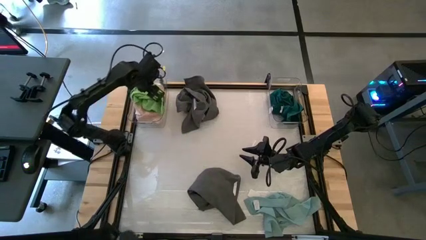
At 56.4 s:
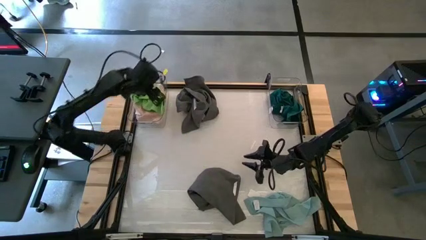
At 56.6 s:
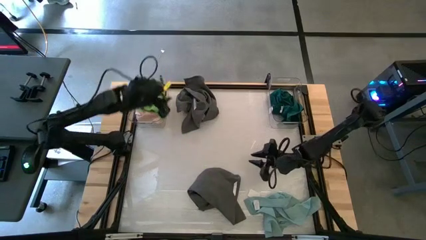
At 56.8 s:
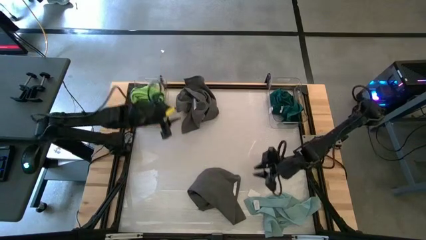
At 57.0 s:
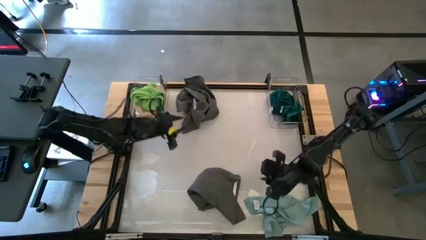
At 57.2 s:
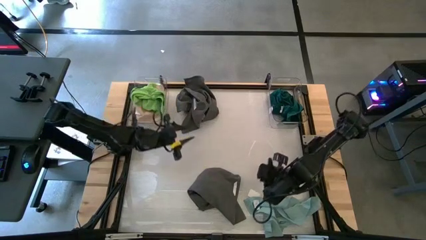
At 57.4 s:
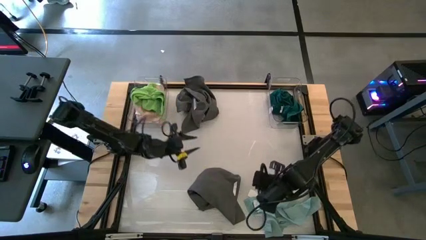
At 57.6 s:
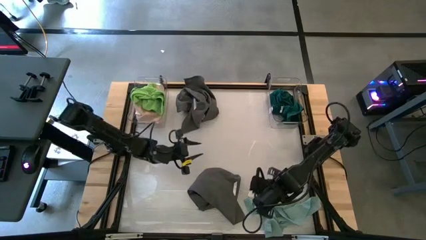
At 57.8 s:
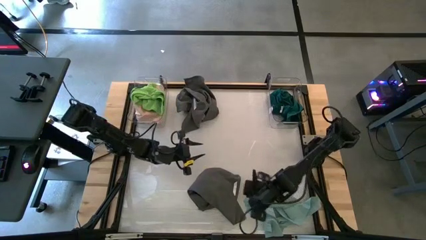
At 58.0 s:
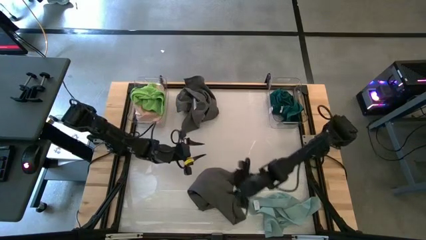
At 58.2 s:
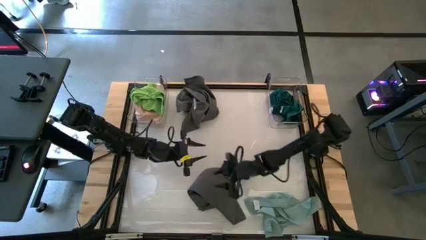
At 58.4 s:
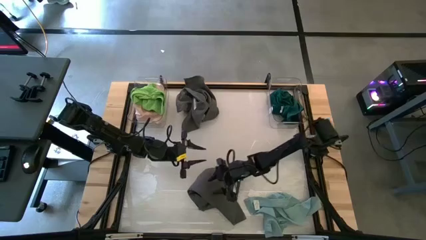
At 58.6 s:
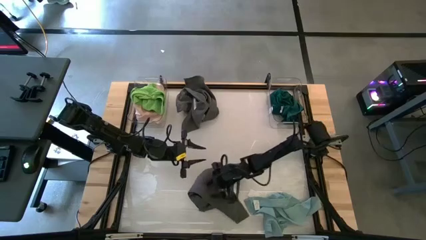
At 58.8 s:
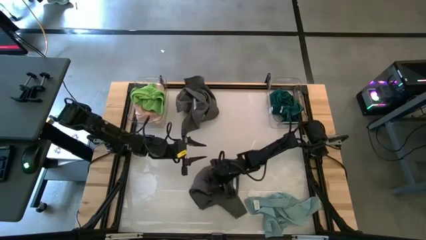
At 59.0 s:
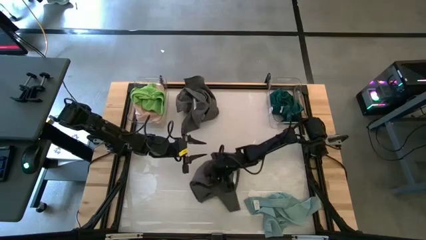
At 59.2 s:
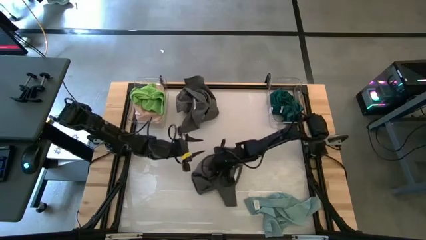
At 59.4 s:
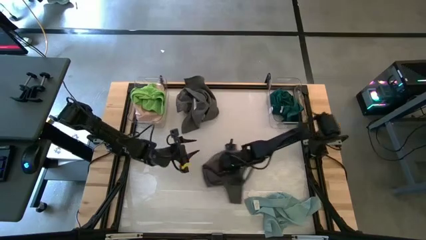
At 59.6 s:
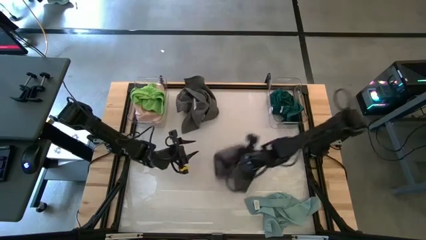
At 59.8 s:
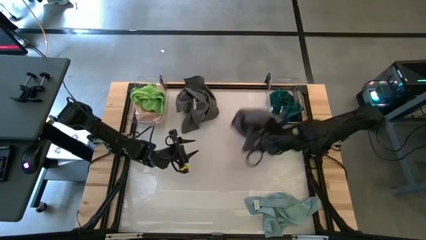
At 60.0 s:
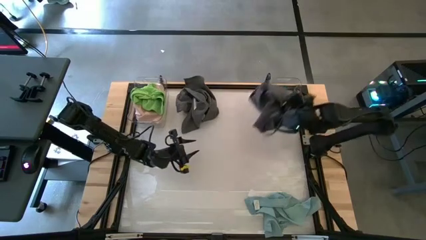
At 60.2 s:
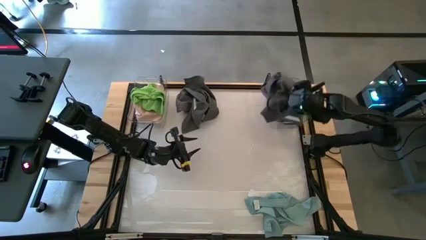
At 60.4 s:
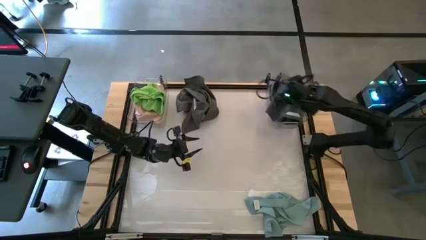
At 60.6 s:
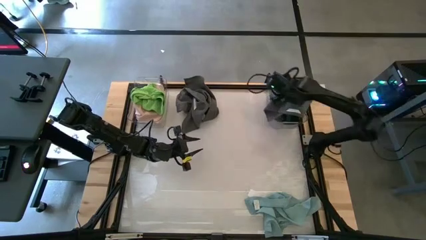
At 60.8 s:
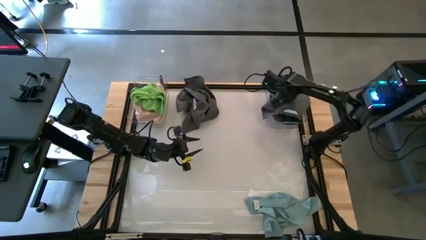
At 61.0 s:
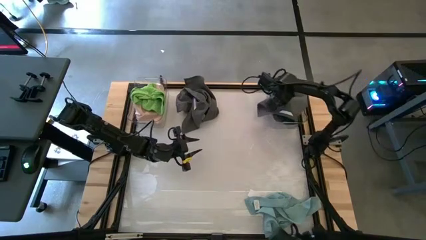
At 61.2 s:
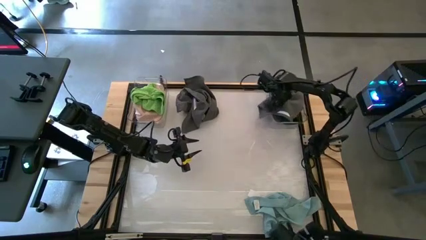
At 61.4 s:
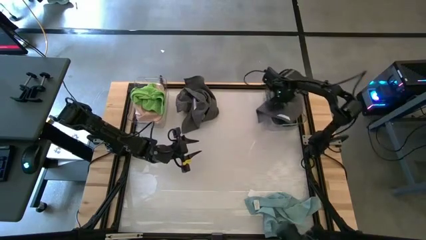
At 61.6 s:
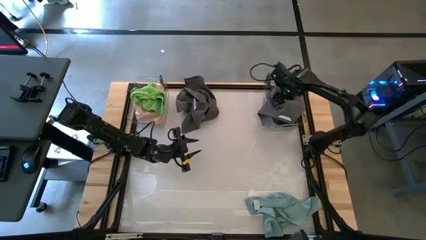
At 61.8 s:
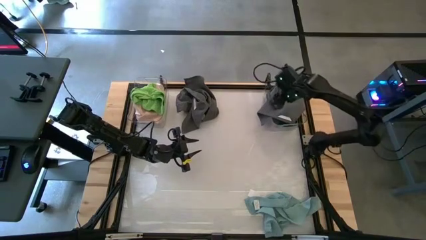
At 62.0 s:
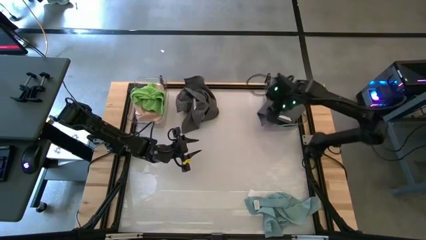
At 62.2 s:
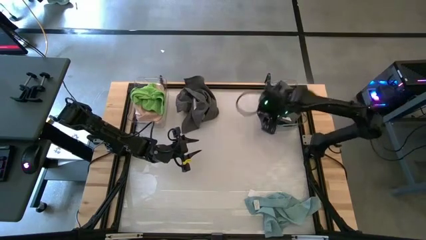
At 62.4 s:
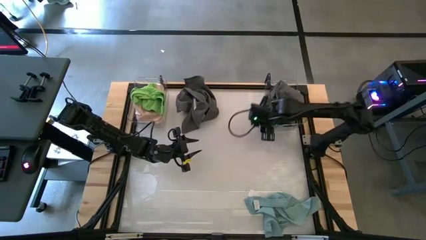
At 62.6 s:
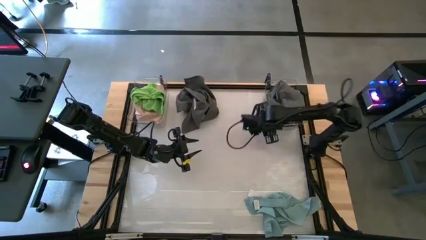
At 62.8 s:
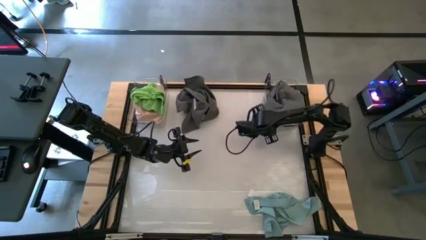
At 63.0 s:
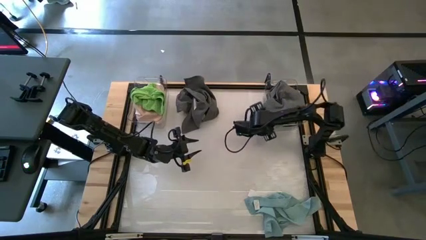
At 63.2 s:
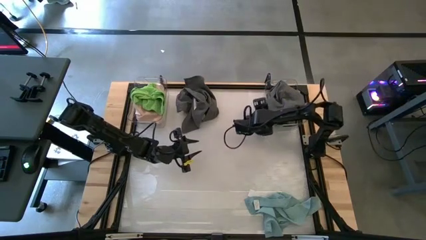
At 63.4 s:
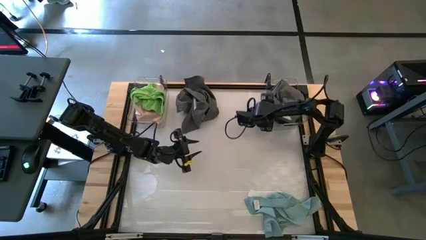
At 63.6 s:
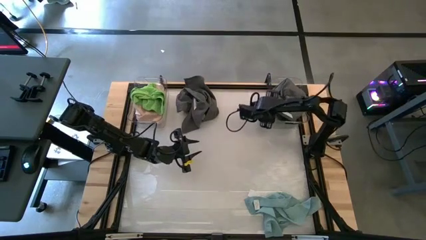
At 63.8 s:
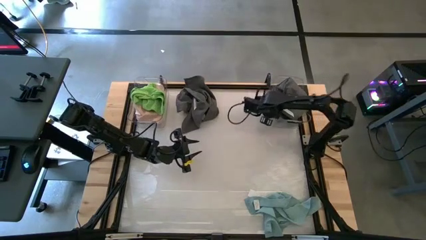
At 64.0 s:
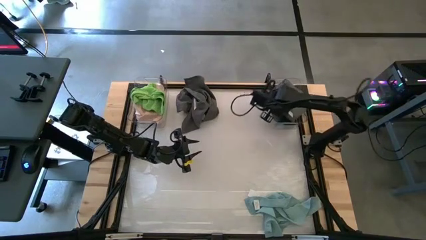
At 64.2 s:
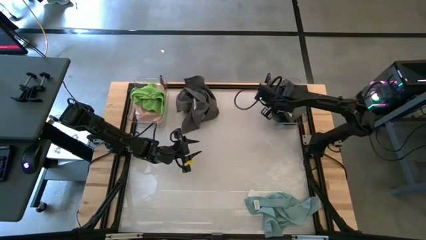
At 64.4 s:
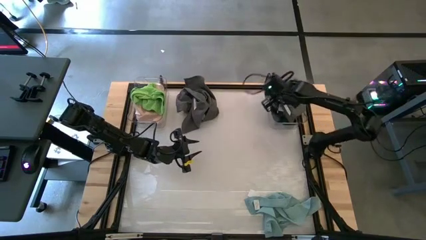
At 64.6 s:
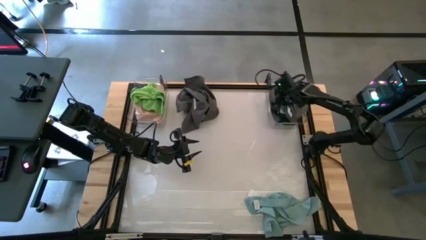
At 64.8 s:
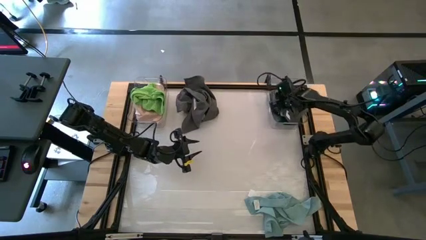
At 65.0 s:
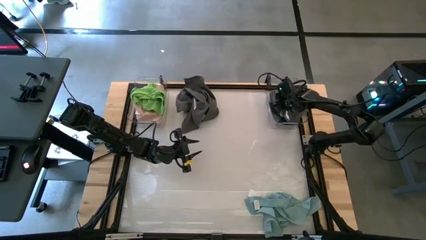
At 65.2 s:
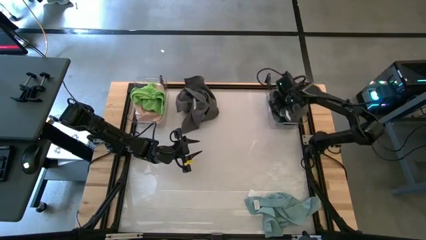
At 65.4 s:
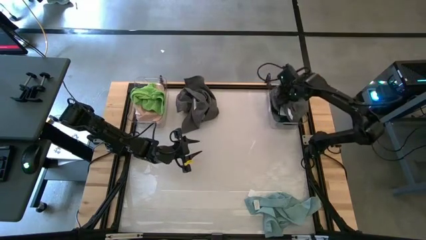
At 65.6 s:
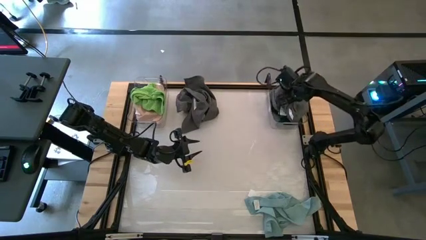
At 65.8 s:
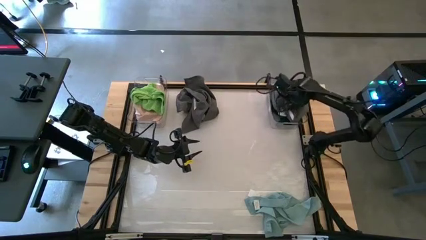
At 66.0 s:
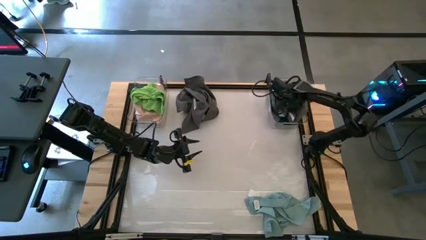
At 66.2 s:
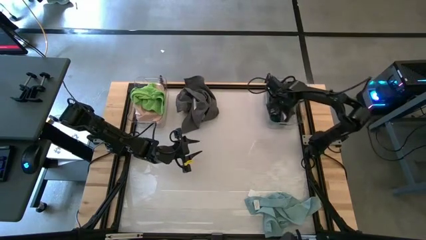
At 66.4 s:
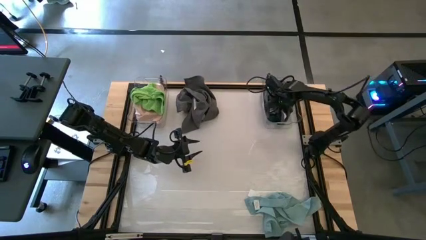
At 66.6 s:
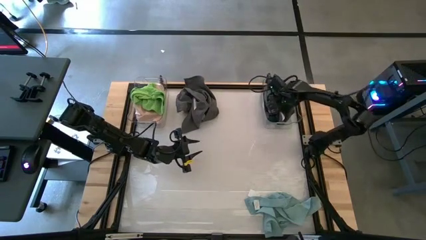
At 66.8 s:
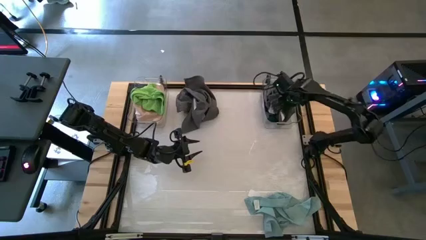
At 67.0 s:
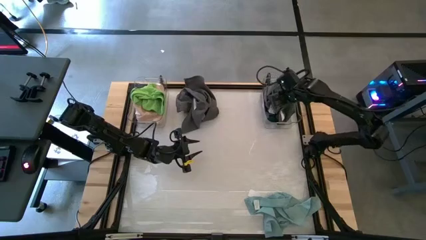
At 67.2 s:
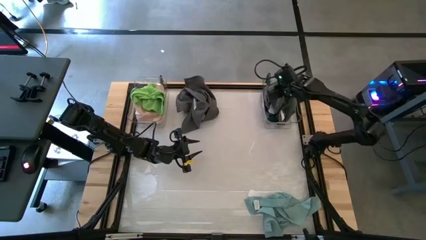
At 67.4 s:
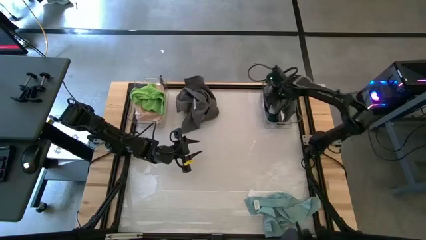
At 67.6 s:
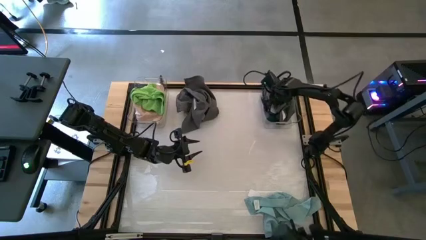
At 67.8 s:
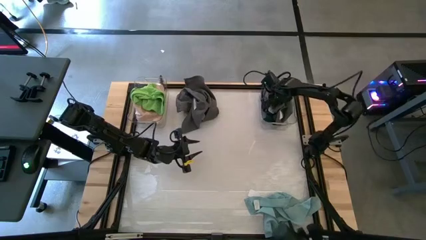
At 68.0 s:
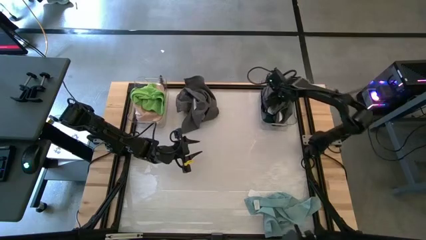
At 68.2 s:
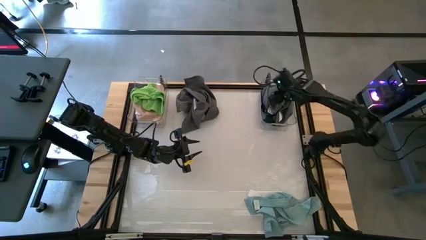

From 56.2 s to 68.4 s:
Task: Sort towels by color in basket
Put the bottom dark gray towel into the right transparent bin

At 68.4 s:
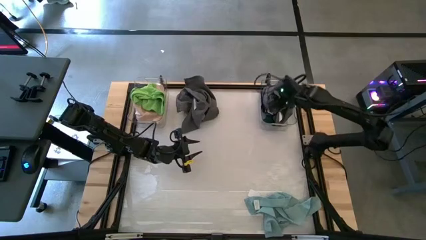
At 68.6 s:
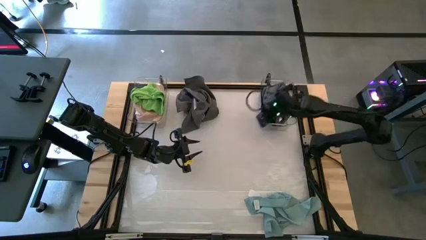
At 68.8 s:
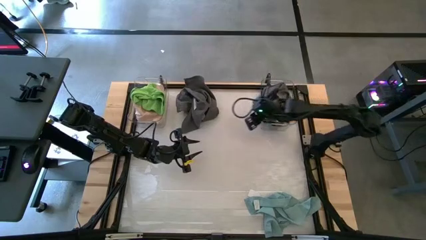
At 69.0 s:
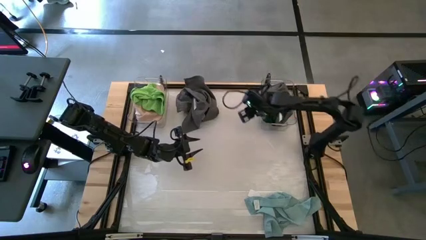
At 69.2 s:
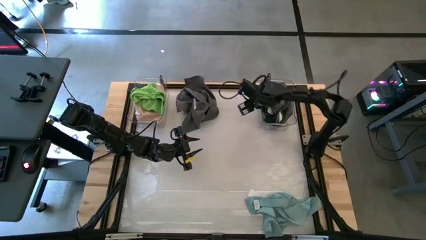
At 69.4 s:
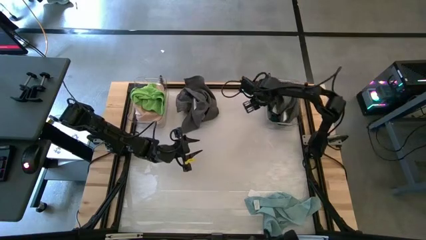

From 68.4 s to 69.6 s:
Adjust the right transparent bin

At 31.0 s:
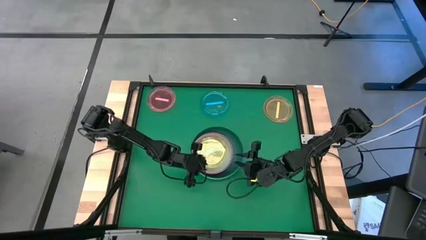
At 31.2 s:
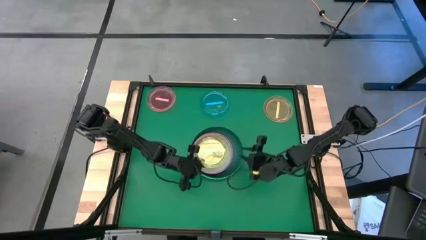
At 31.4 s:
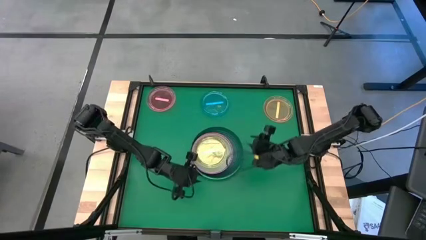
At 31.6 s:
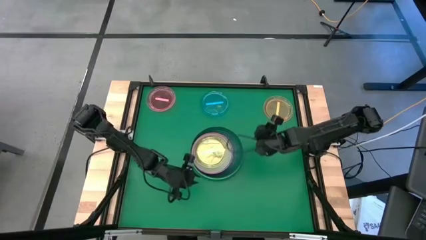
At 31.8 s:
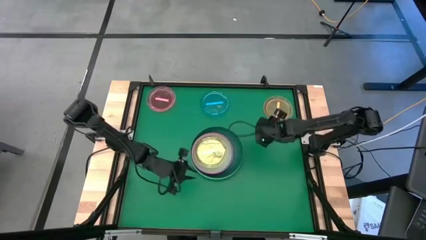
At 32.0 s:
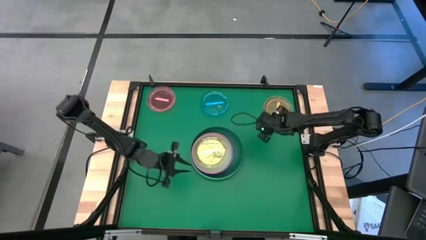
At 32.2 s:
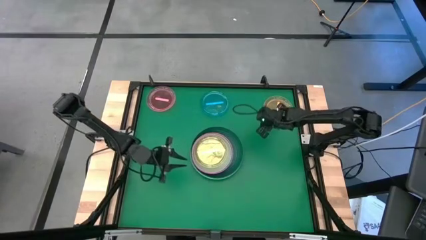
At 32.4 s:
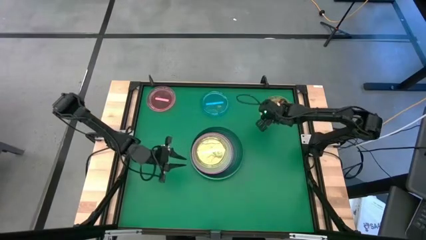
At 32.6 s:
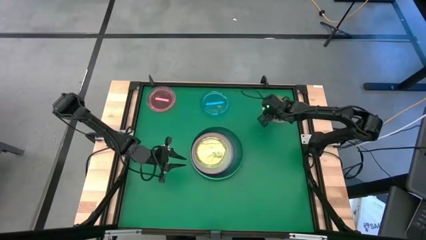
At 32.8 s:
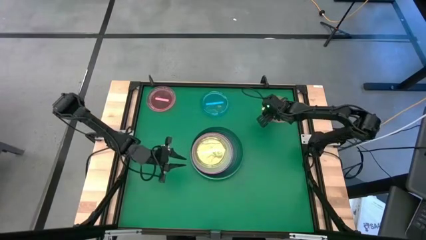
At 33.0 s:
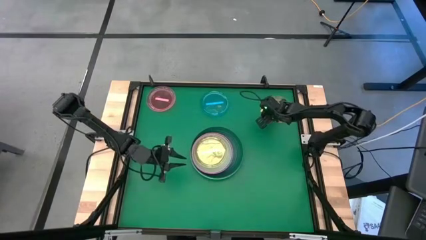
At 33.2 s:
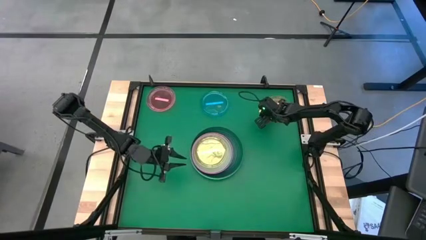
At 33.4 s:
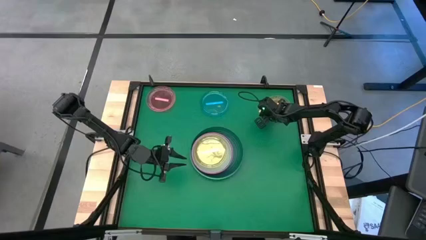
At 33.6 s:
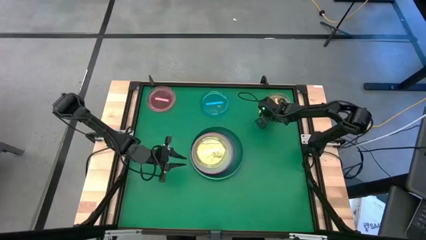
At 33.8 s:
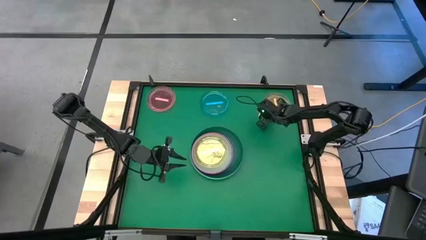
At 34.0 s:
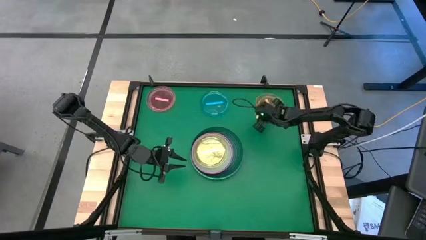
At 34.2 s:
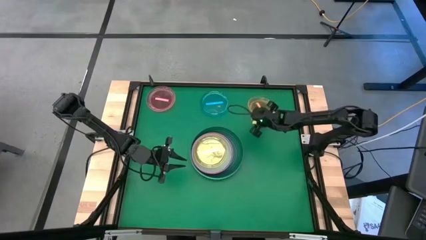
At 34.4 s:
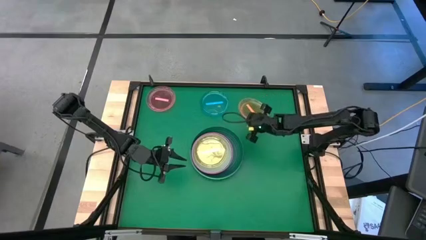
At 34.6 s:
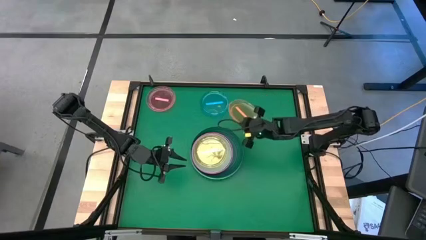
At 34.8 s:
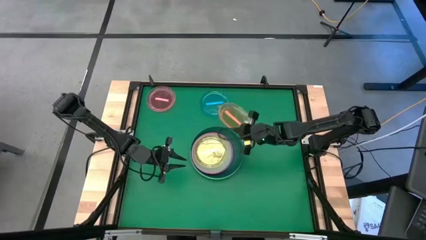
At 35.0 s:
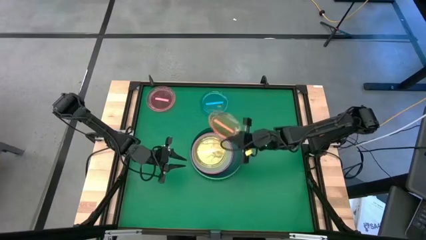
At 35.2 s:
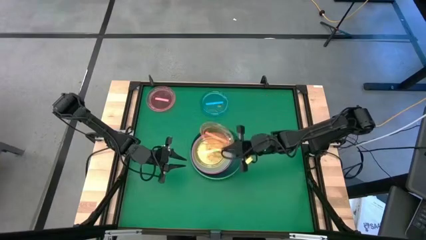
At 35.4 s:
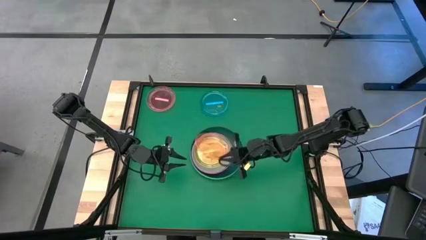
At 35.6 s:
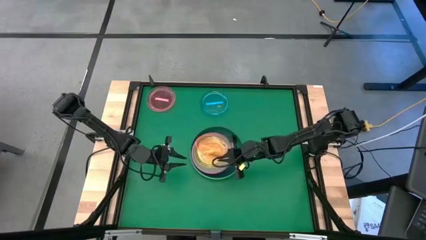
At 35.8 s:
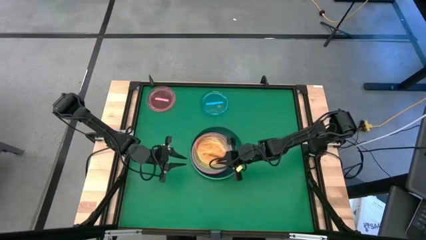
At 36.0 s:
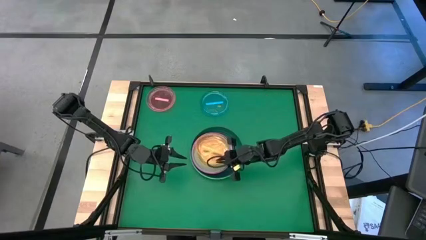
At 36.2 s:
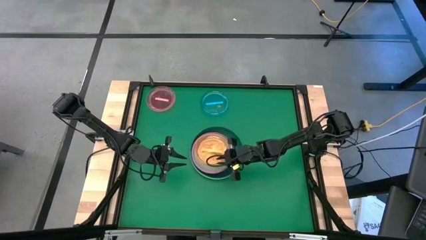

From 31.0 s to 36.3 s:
Task: Stack plastic plates
Stack the orange plate on top of the light green plate
